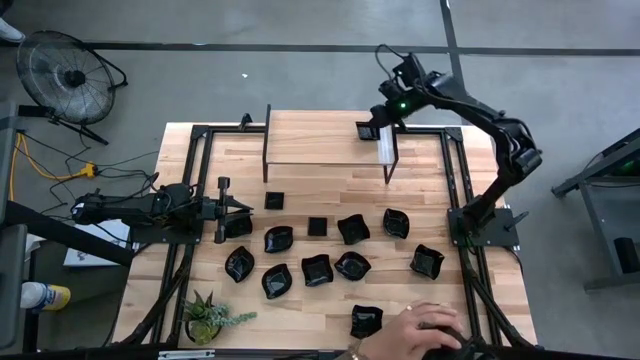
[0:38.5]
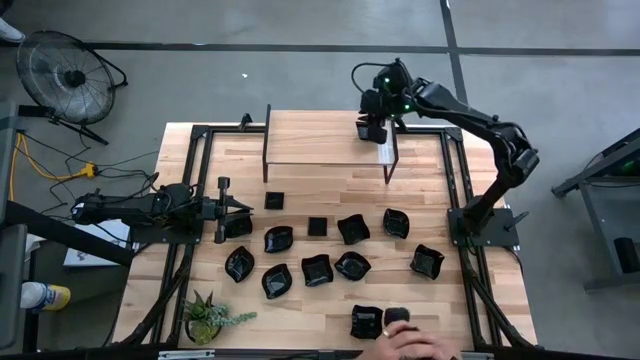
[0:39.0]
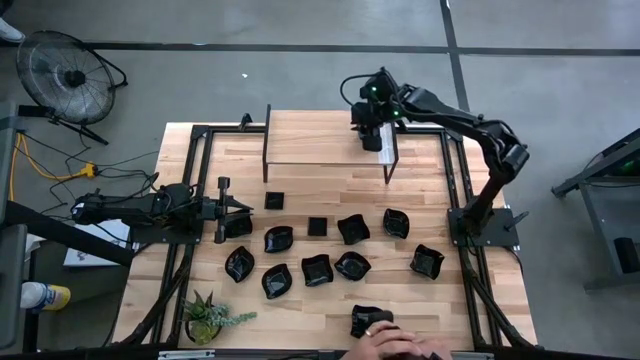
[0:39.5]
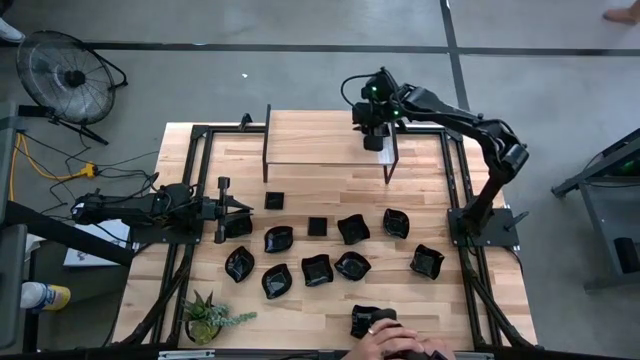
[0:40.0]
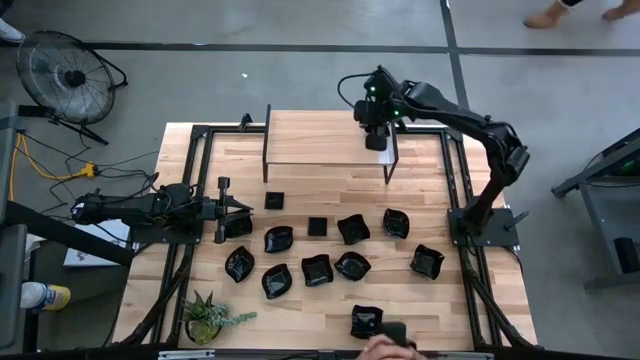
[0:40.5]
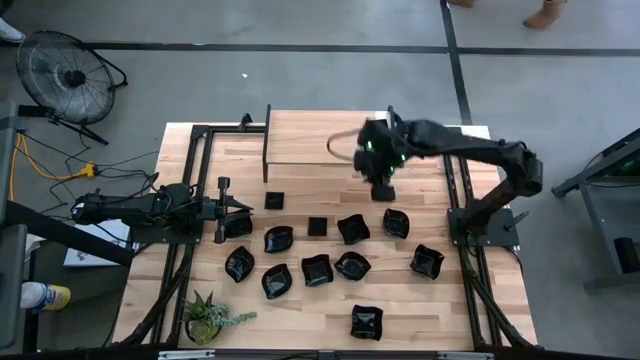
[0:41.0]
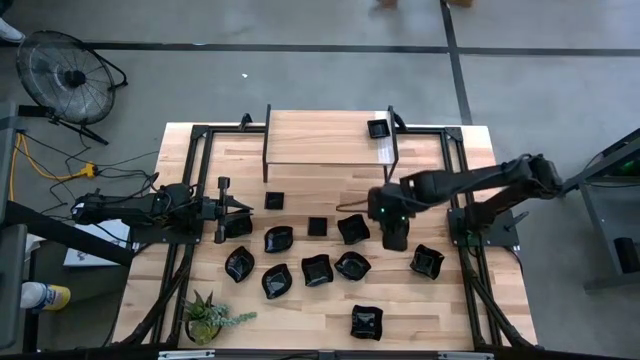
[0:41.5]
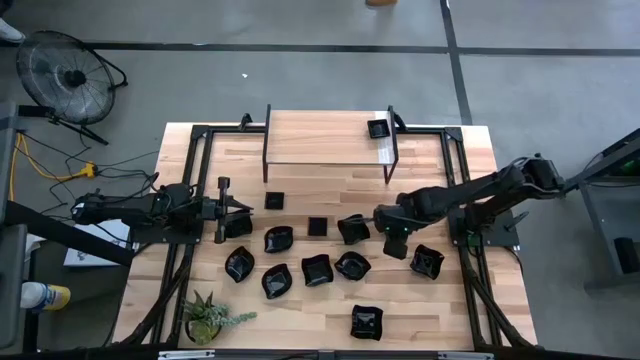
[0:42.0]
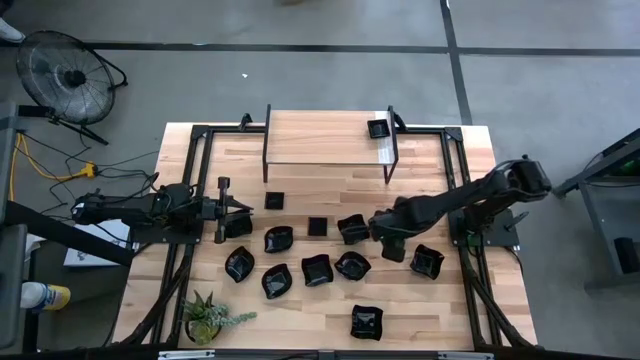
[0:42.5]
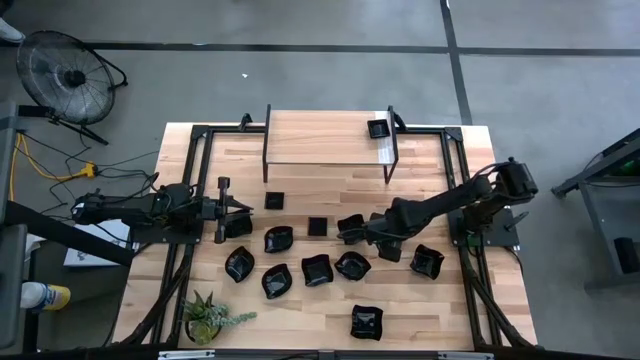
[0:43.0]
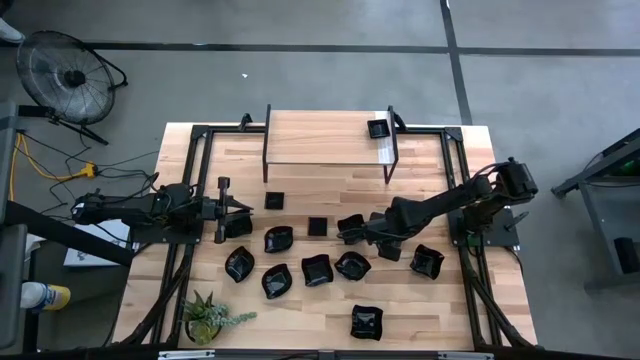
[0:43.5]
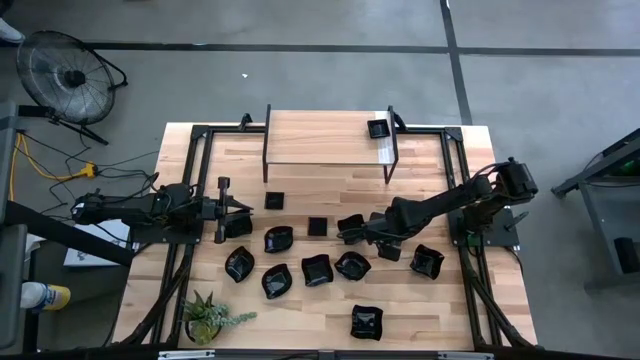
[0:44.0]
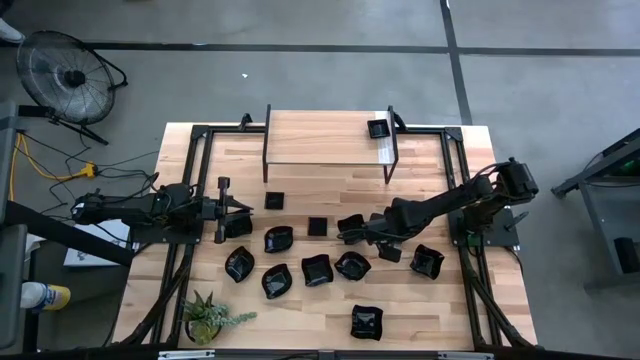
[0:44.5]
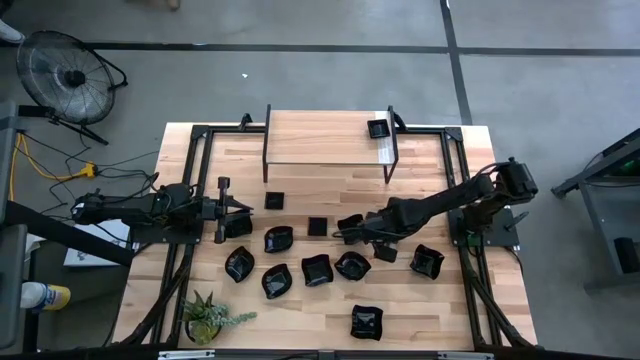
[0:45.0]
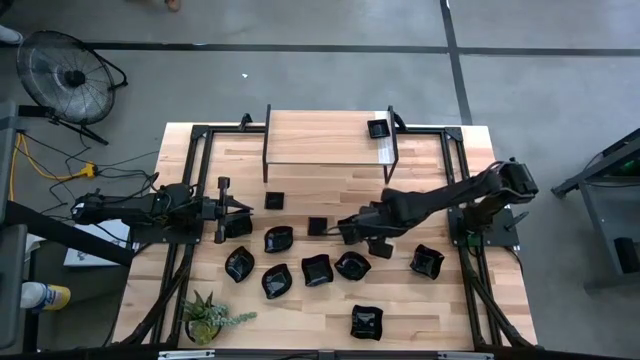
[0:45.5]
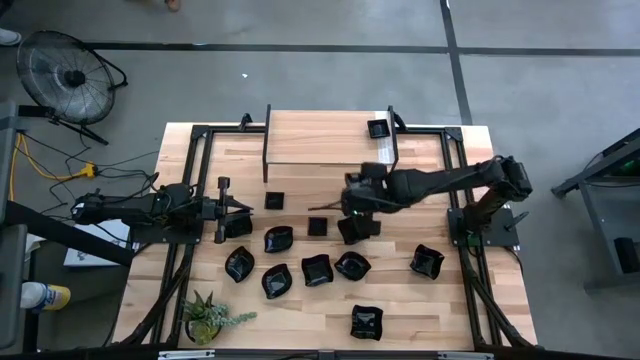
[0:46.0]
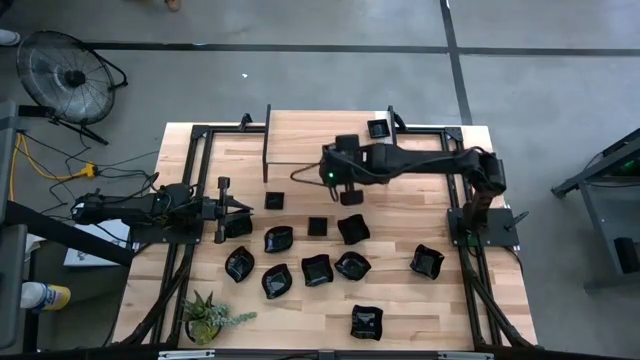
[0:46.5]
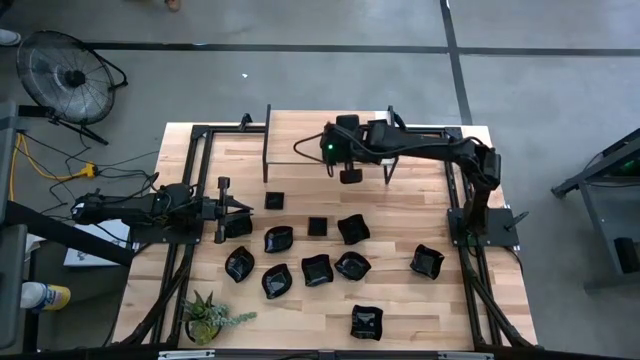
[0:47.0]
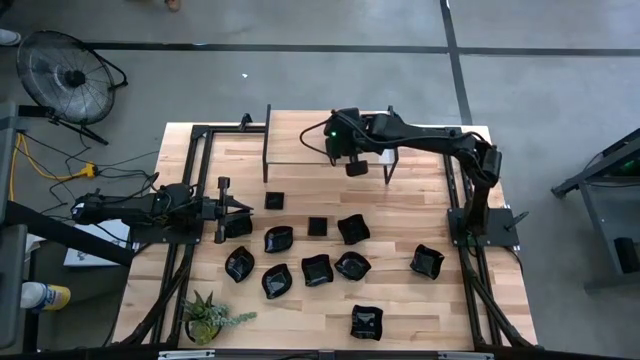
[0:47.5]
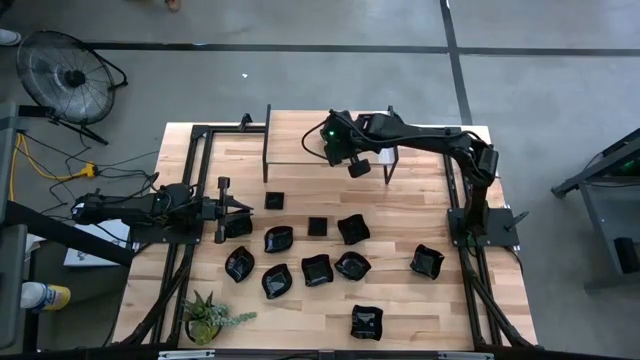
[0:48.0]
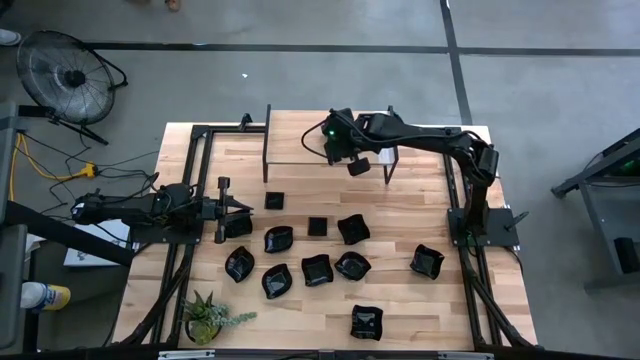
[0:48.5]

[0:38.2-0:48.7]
Task: Pick & Place Mini shaped plates
Put the black leaf shaped plate on the shelf

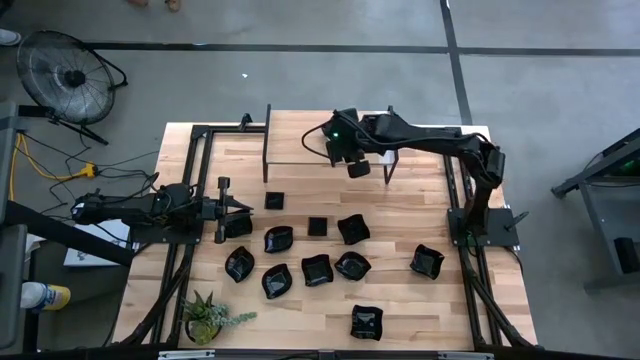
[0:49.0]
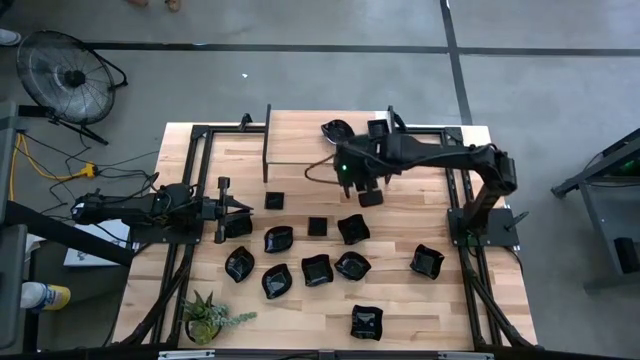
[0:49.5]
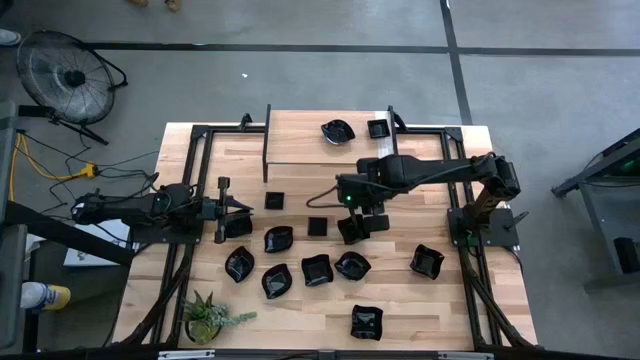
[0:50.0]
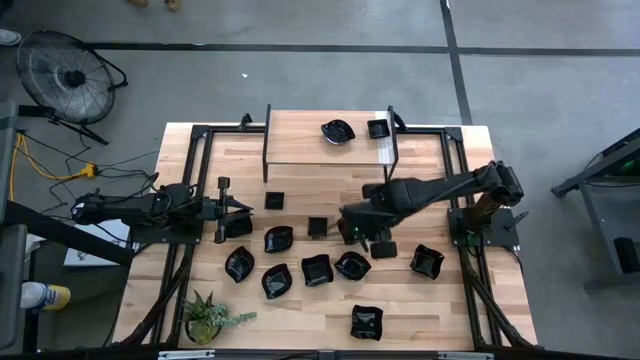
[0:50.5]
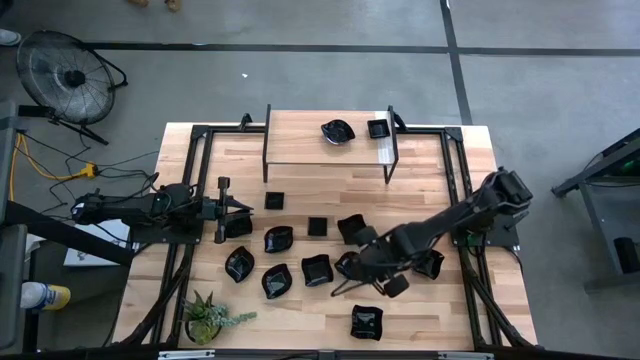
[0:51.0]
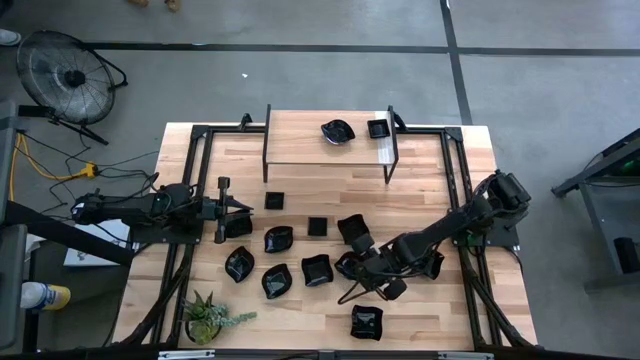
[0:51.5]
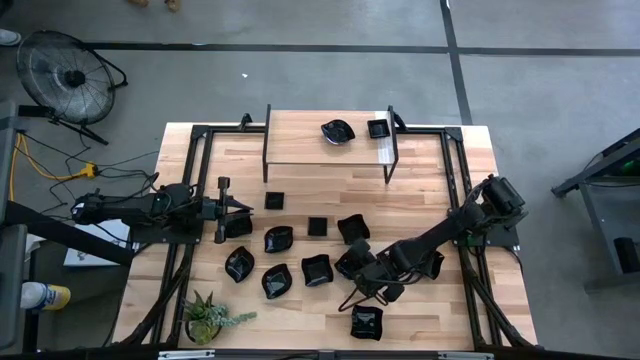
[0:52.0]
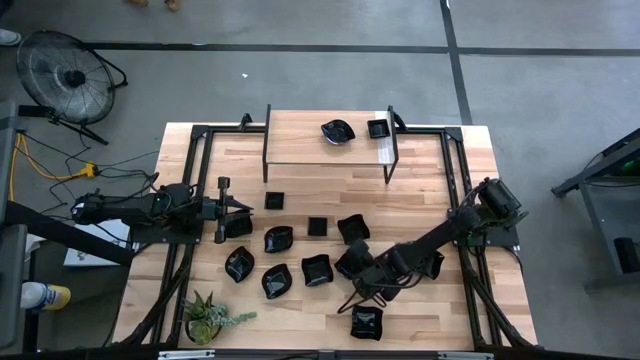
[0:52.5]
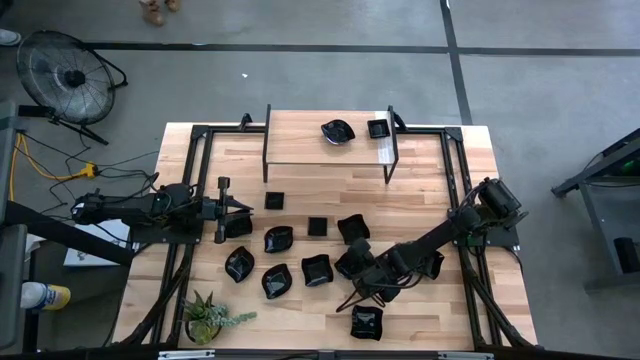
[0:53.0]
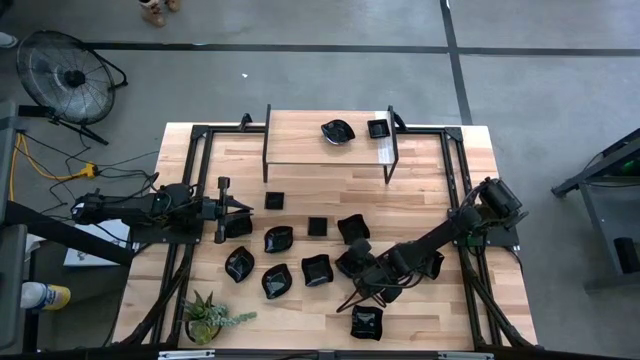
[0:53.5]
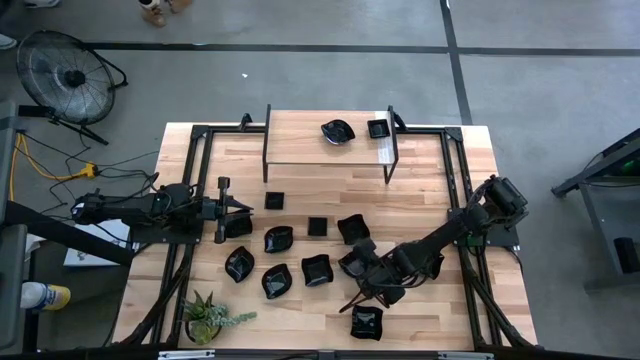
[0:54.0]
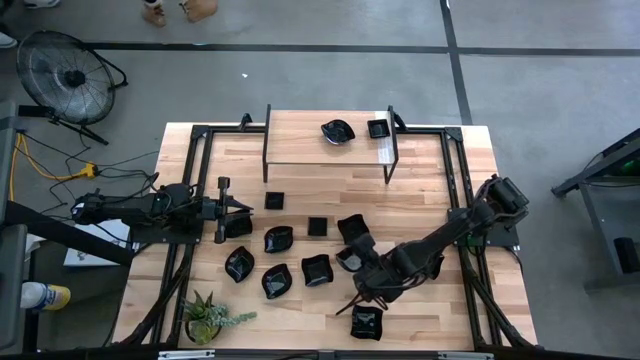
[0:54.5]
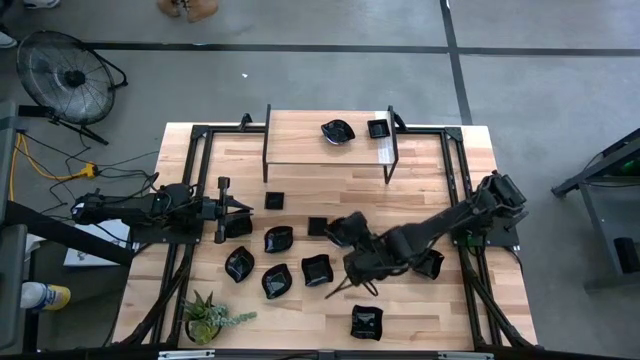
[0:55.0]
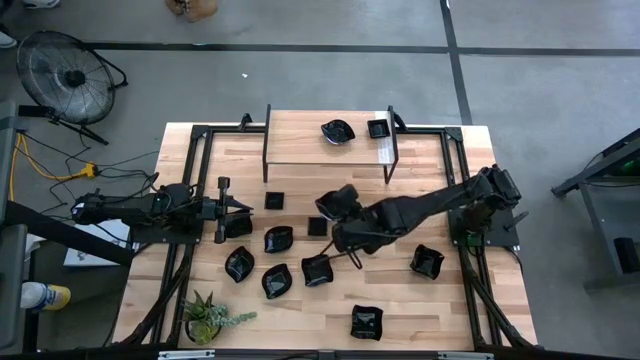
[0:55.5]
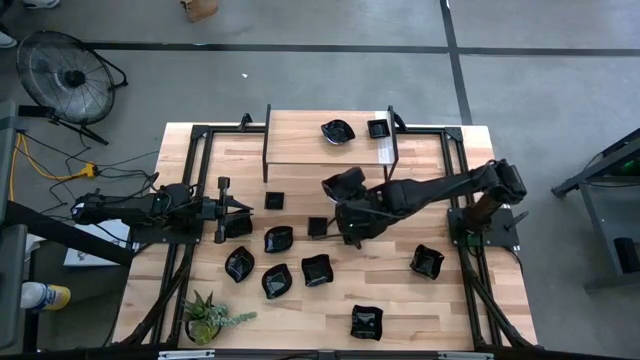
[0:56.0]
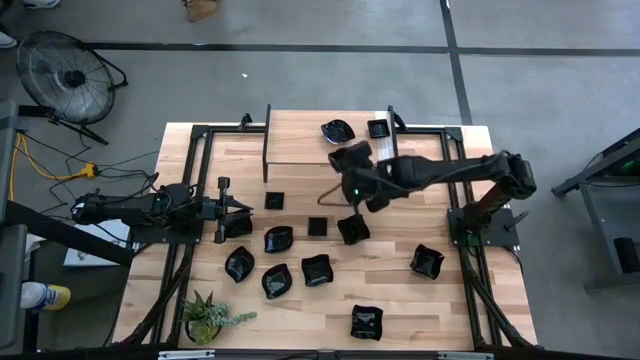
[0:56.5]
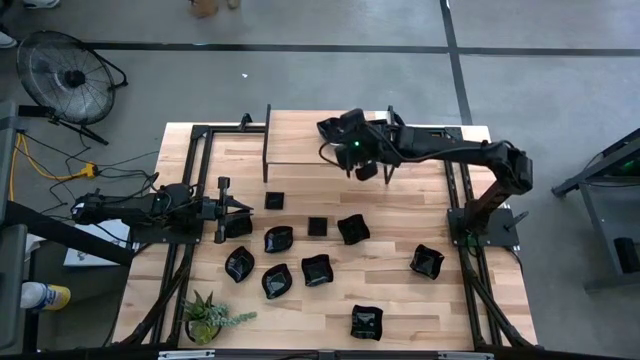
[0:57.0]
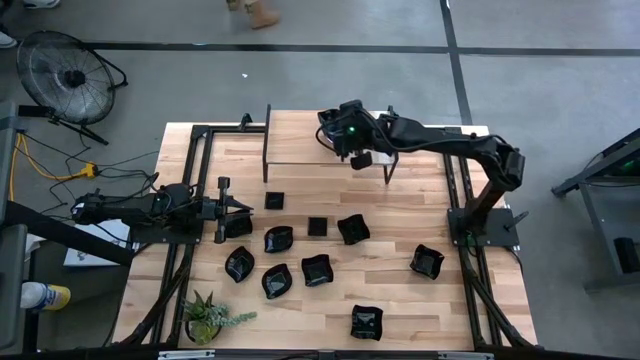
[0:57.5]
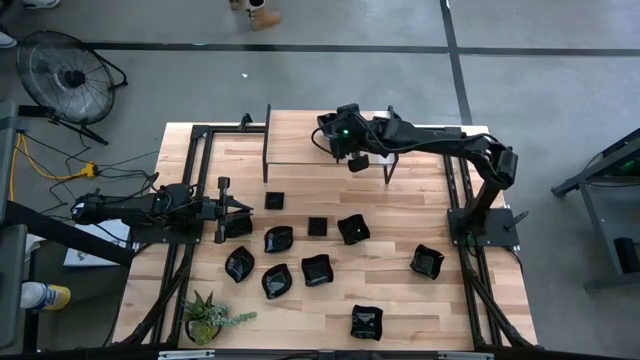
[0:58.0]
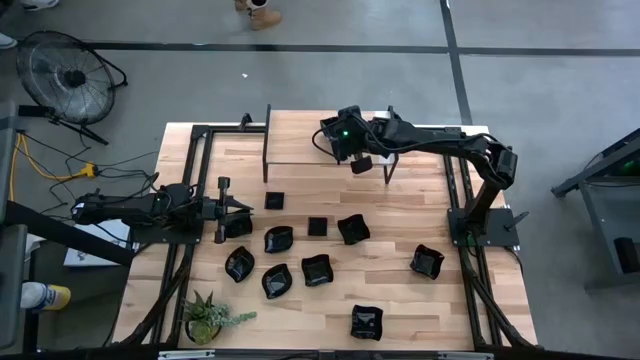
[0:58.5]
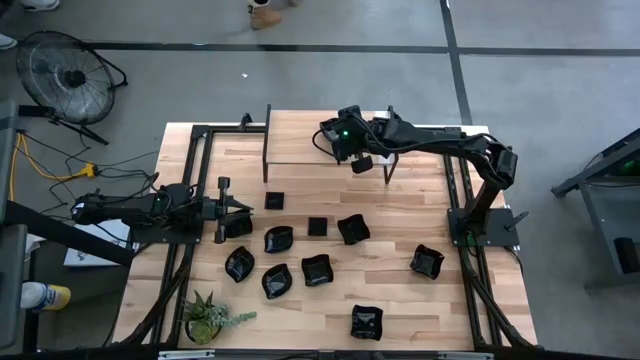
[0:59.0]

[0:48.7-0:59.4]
Stack the black leaf shaped plate on top of the black leaf shaped plate on the shelf
